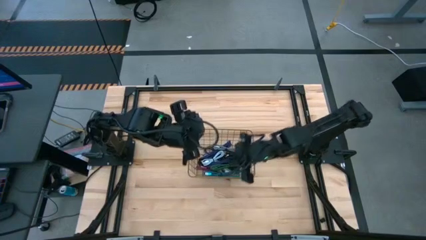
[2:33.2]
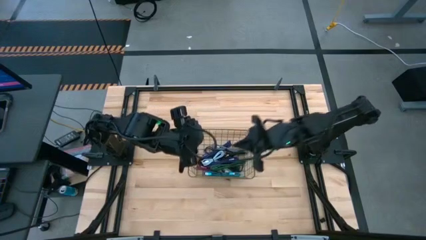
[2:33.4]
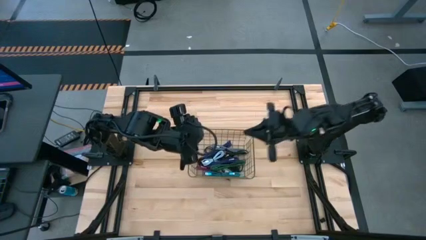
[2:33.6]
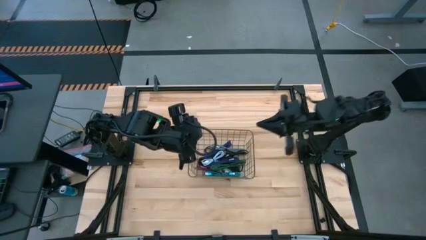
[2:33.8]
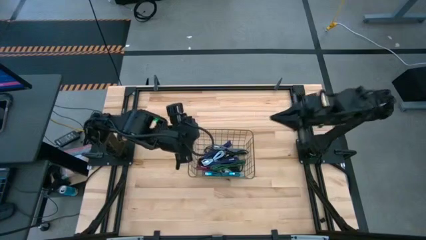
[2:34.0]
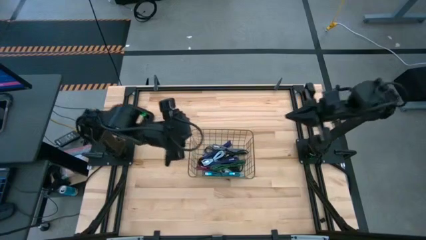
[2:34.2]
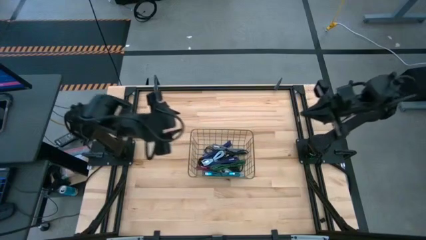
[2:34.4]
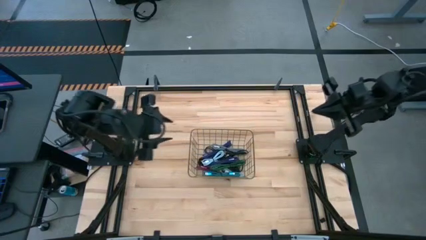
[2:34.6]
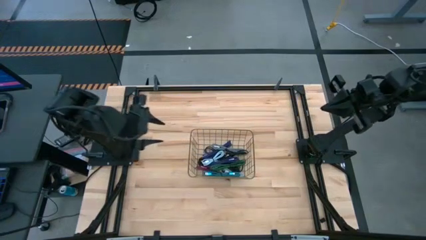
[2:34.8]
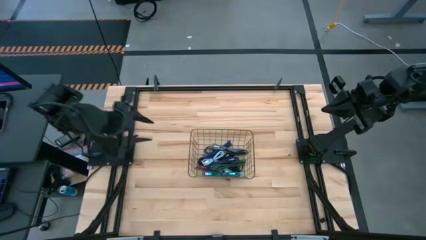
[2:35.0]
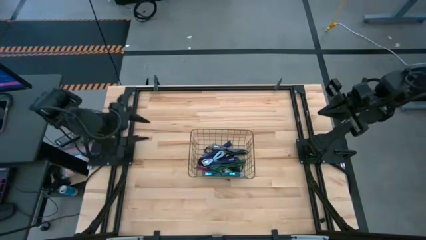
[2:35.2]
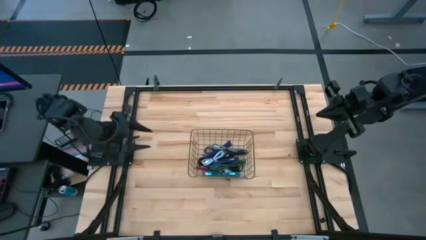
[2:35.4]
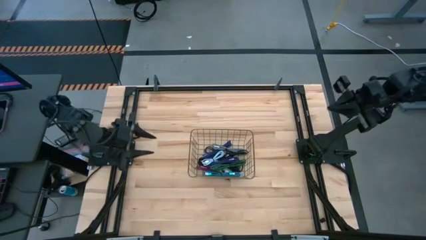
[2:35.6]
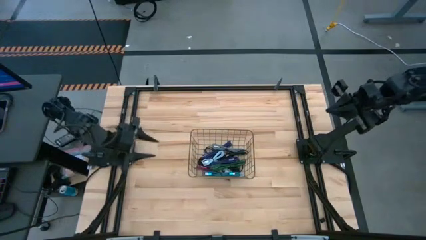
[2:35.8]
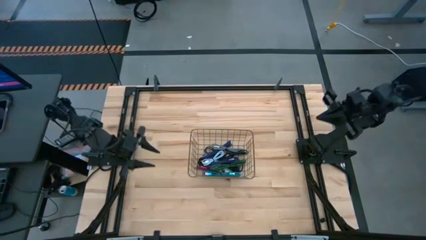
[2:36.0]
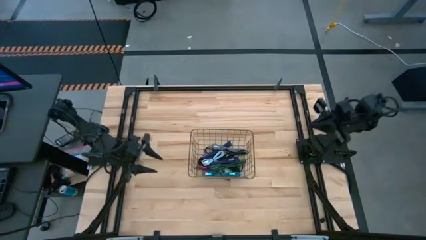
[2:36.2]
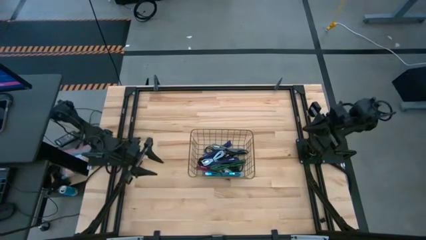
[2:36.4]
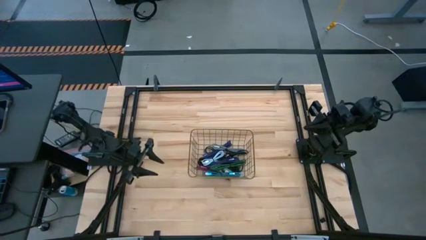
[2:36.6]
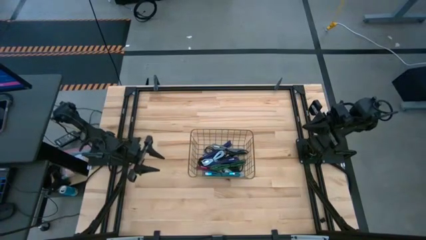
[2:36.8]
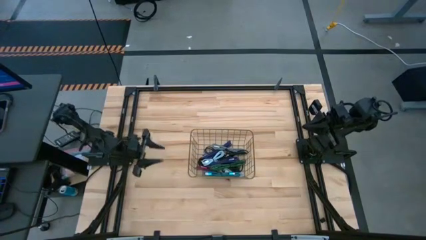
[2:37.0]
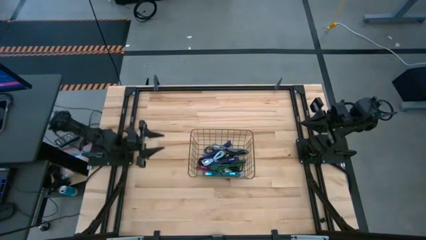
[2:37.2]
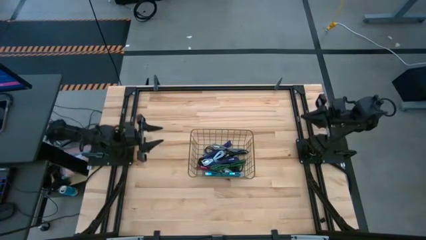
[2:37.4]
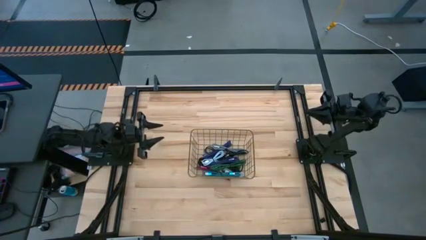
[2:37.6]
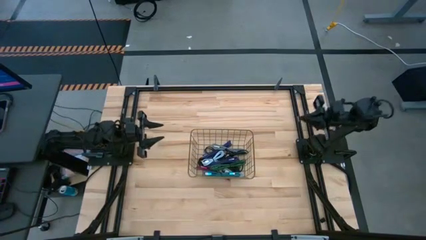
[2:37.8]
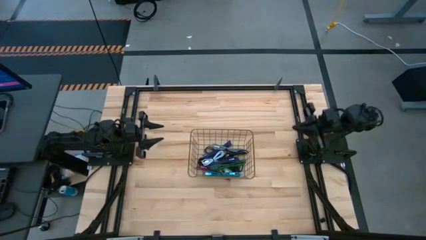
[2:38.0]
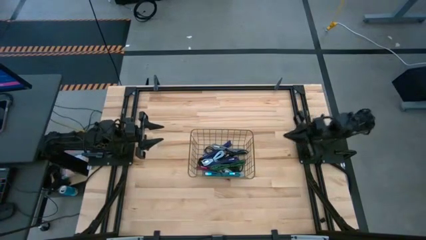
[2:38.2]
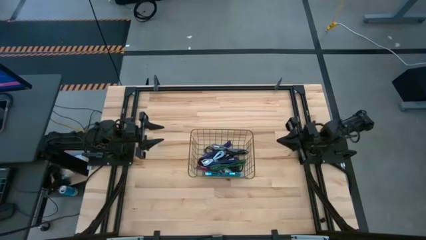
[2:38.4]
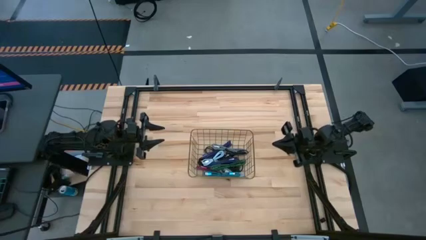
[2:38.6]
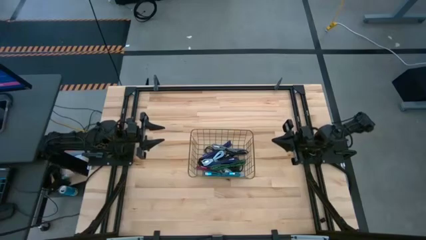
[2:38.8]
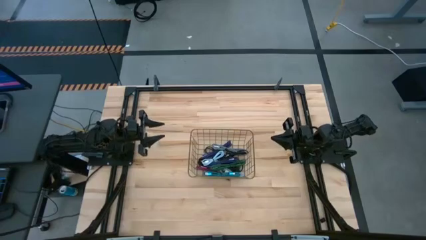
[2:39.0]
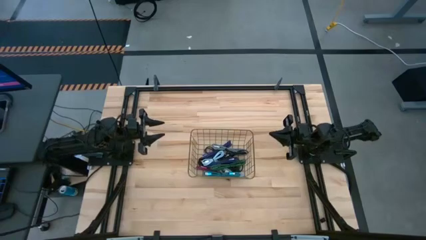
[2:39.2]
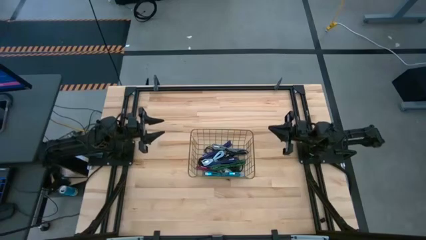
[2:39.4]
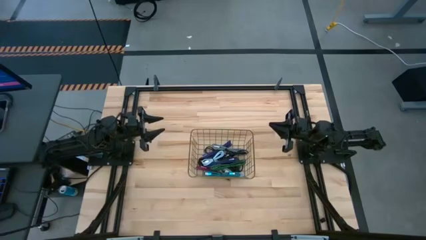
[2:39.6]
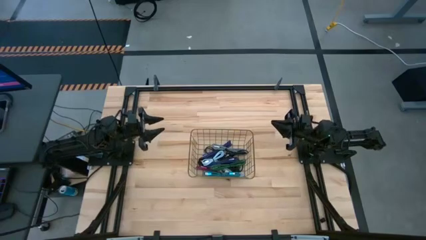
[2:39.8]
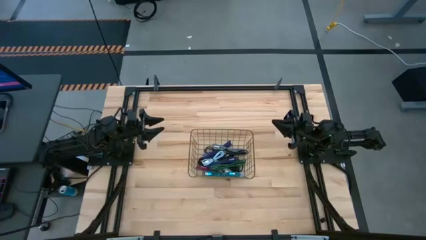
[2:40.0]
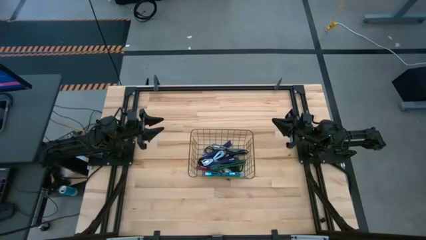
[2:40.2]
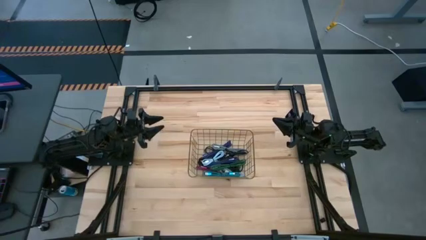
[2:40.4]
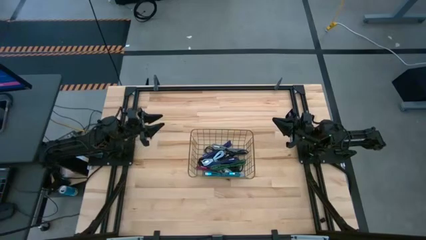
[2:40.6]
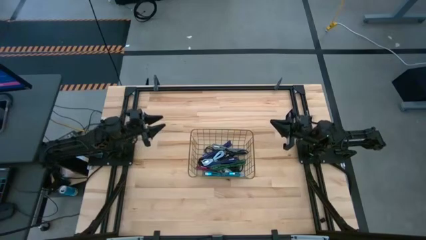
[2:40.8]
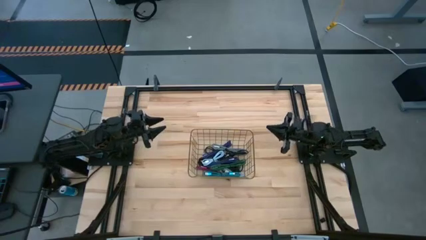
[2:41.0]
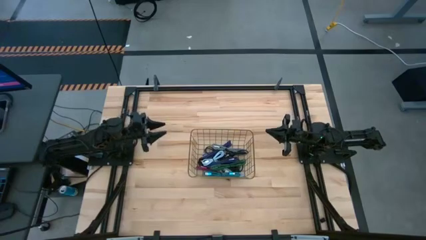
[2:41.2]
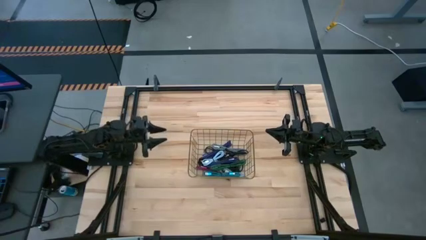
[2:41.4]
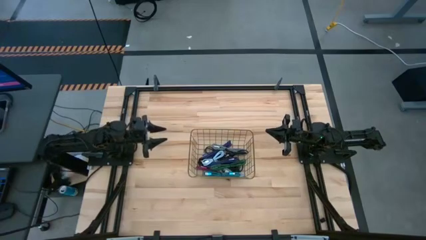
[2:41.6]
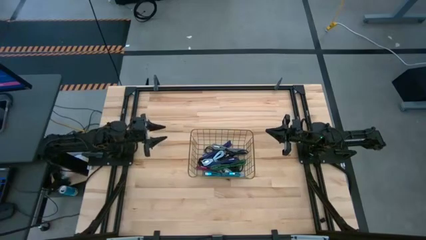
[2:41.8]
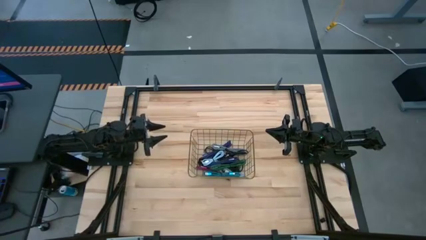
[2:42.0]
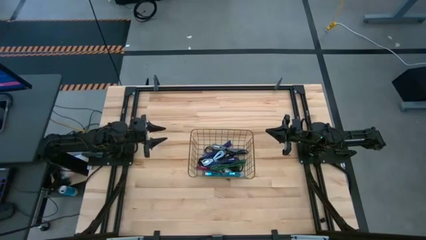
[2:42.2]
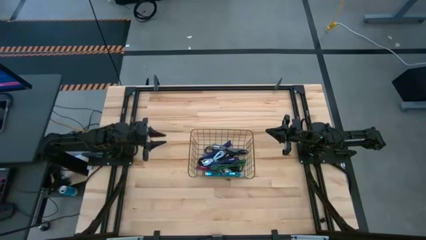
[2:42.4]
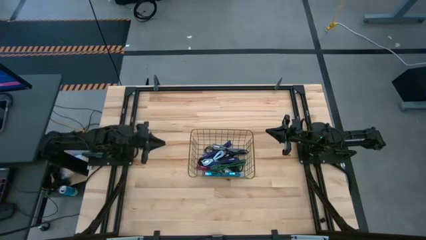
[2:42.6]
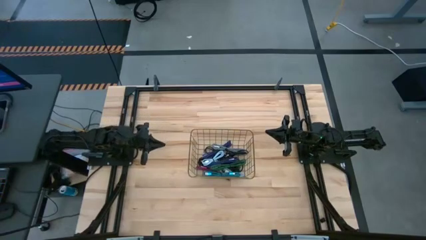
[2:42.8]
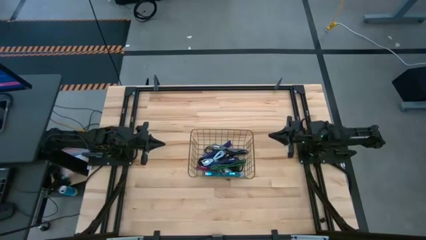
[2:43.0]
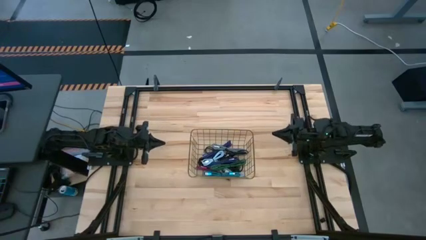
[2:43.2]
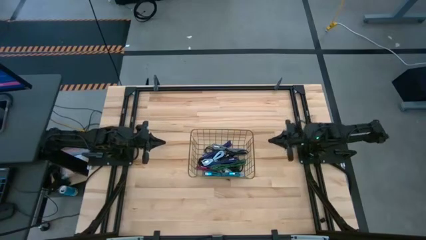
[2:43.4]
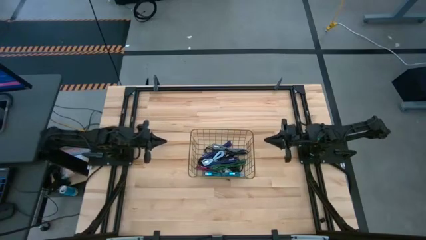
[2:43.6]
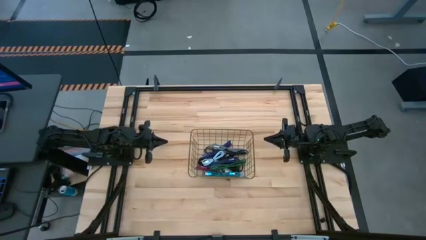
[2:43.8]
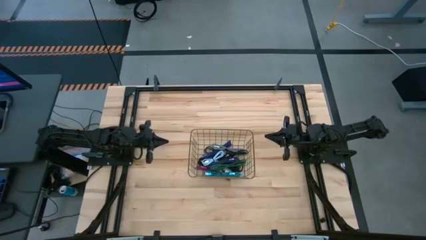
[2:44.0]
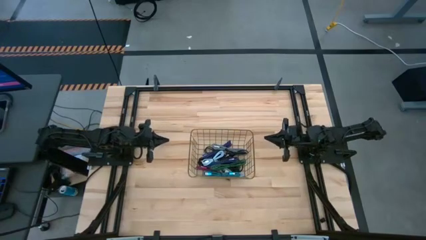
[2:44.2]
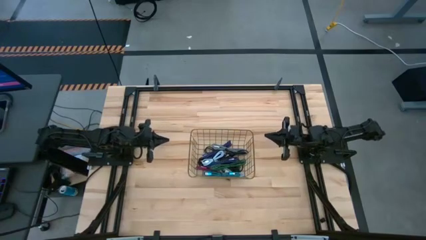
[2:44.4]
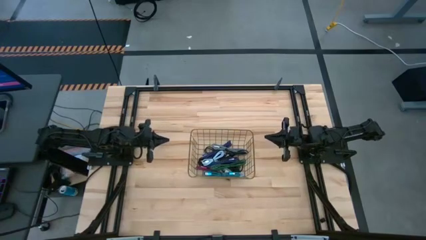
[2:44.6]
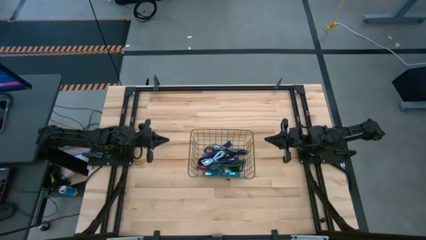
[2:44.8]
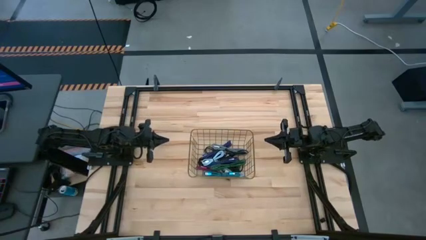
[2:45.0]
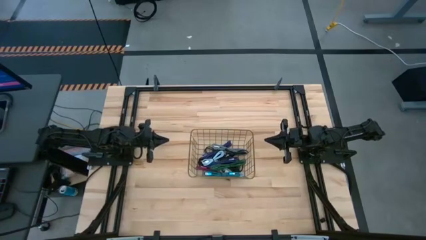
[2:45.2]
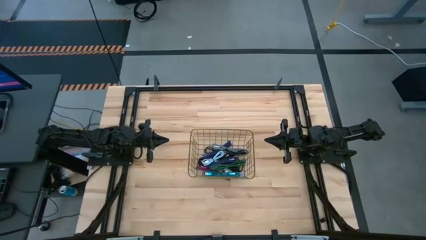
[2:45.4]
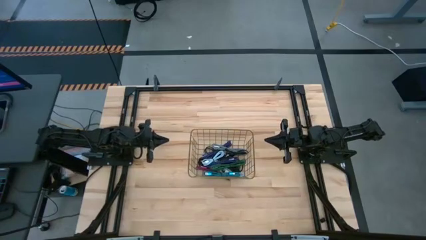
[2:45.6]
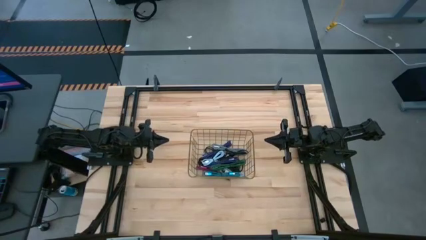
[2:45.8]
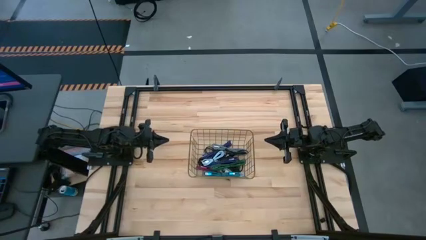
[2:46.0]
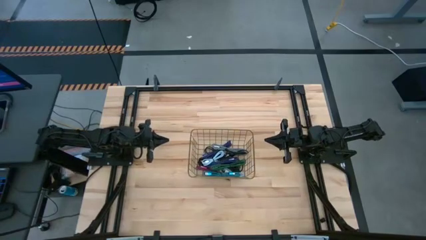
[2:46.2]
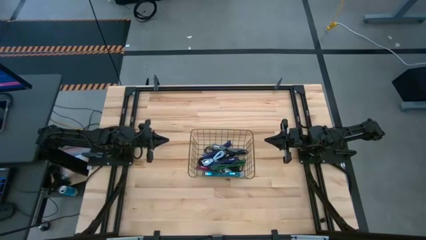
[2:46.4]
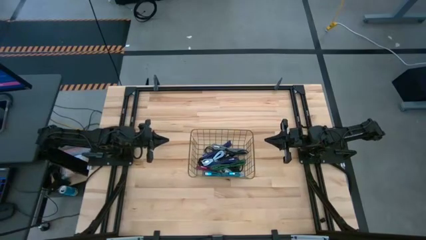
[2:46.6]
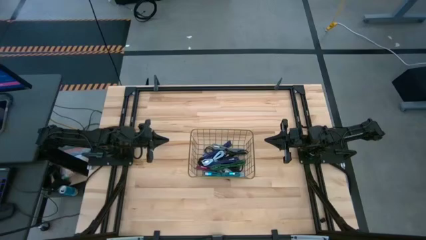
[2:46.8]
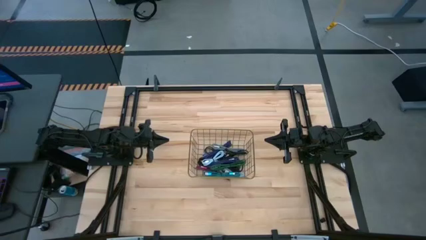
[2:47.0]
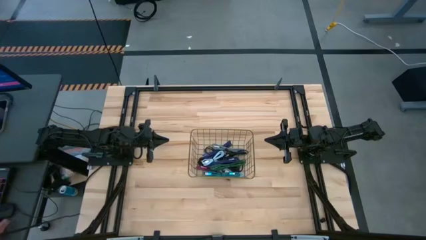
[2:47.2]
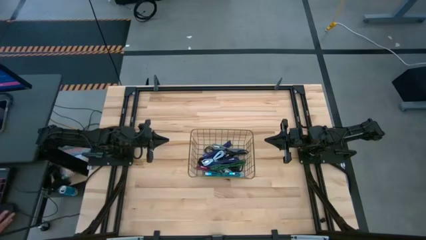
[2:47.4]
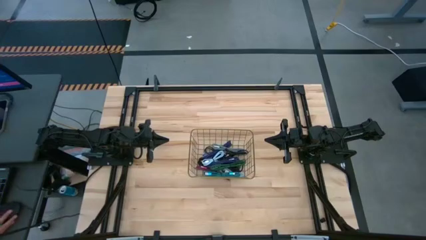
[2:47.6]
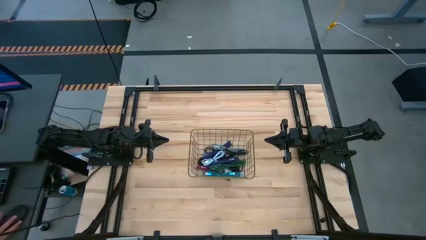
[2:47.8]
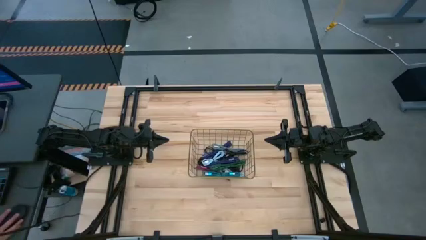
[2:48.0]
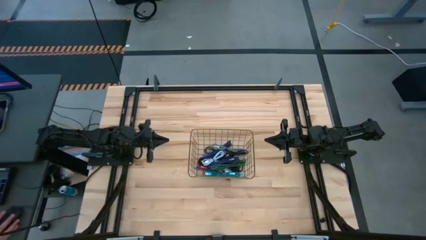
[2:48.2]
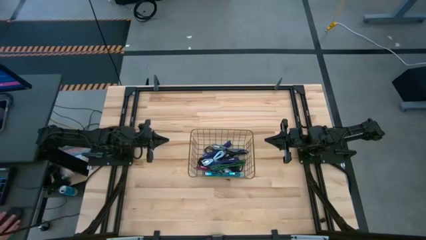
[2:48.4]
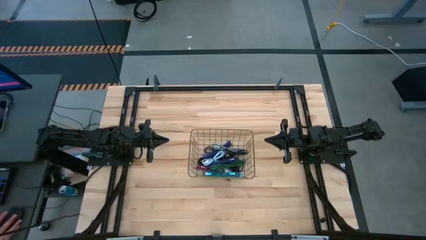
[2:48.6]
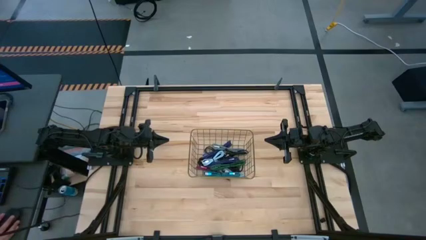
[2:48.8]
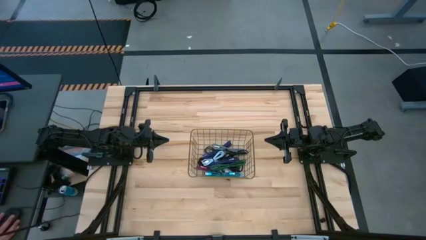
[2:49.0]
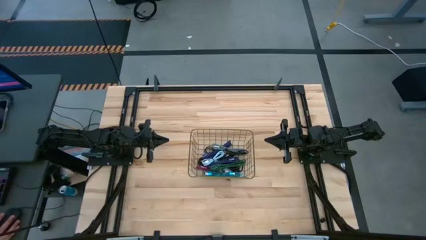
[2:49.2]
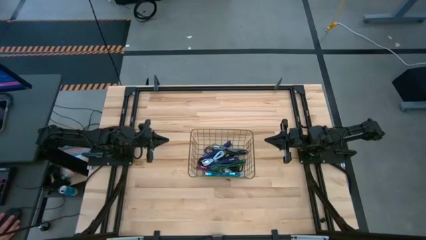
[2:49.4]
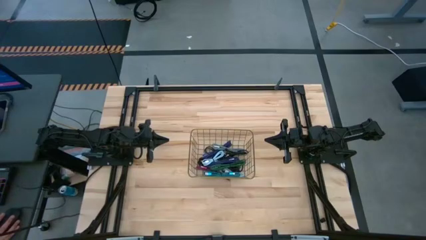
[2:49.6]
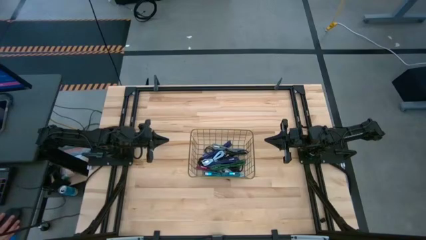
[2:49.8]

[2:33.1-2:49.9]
Task: Pick and place USB-C Cables
Return to Home Position
